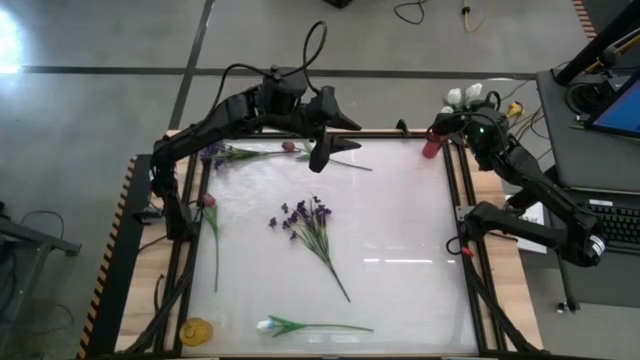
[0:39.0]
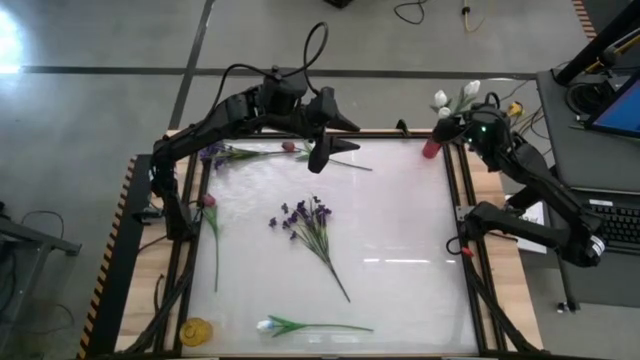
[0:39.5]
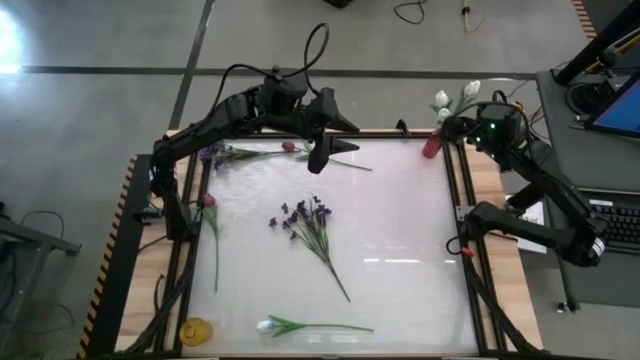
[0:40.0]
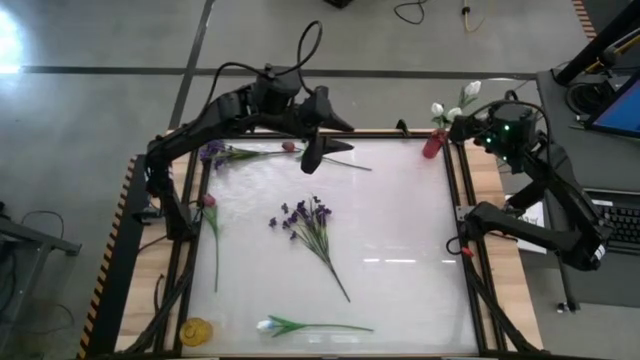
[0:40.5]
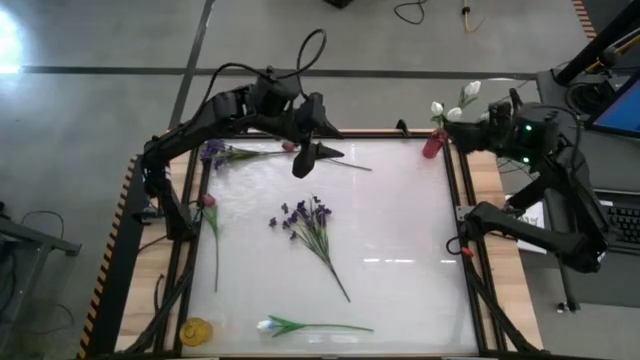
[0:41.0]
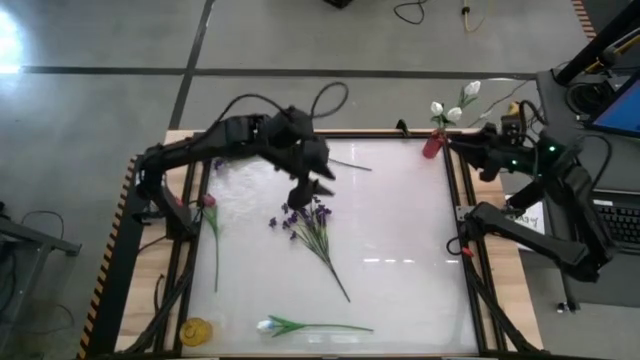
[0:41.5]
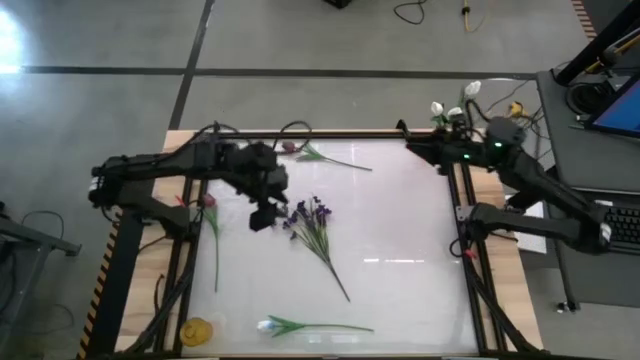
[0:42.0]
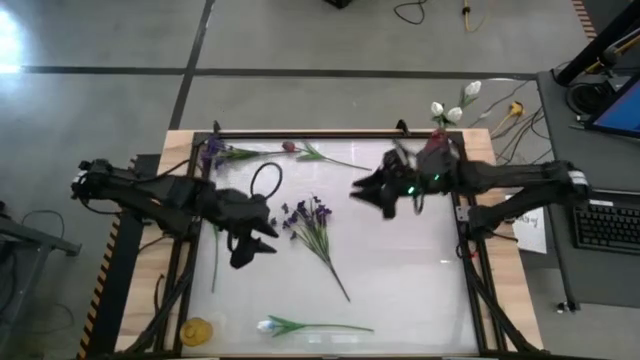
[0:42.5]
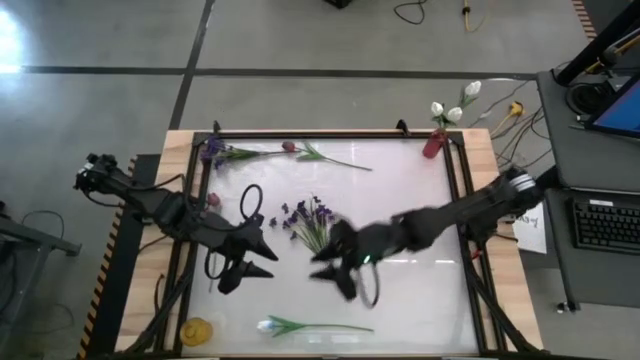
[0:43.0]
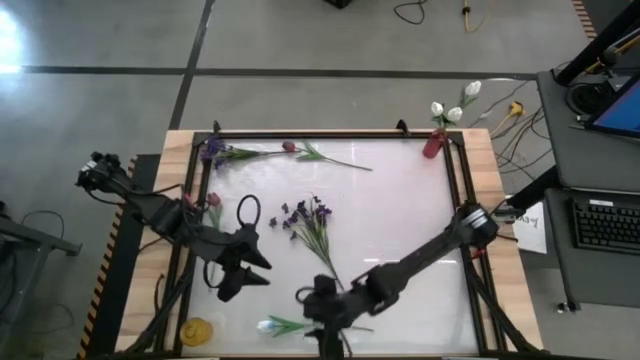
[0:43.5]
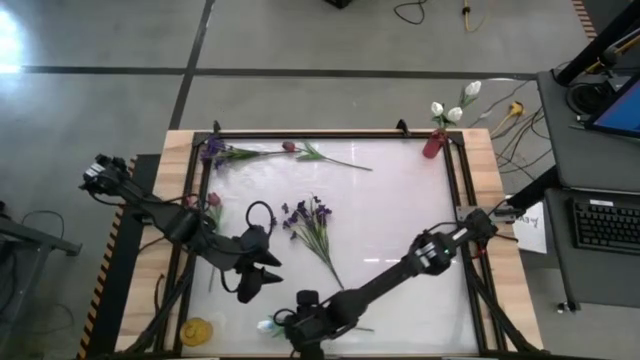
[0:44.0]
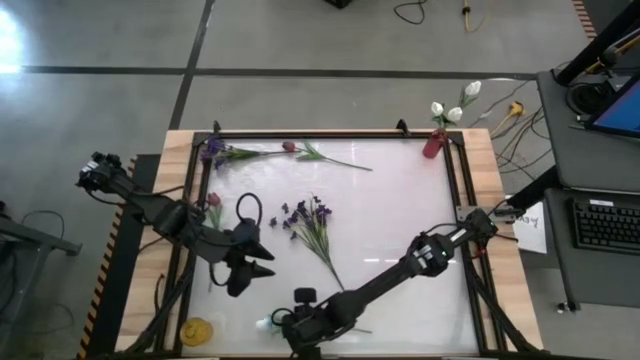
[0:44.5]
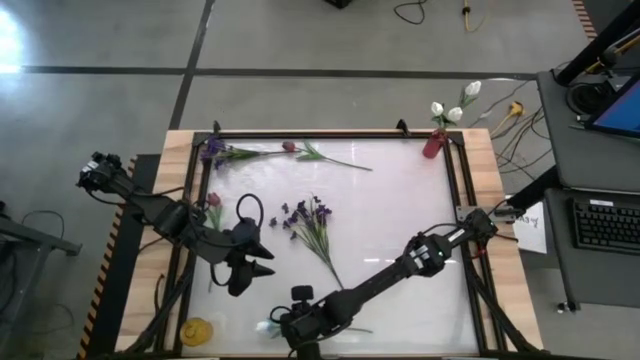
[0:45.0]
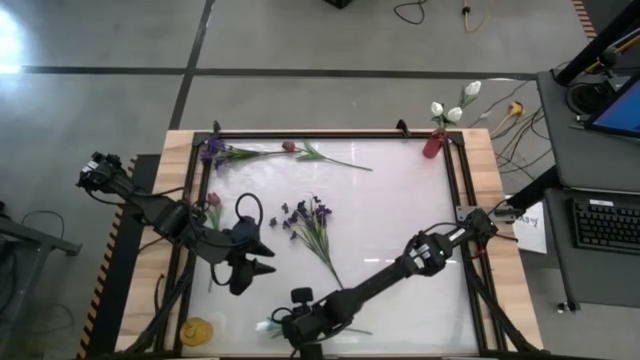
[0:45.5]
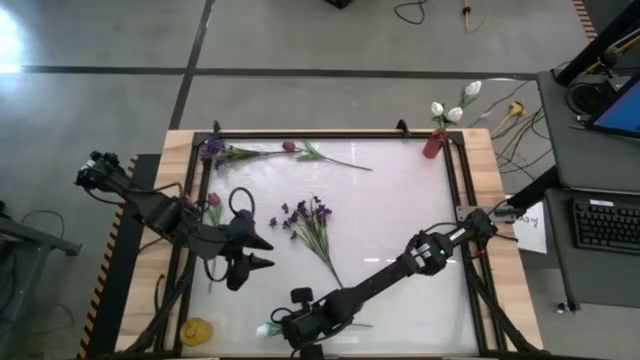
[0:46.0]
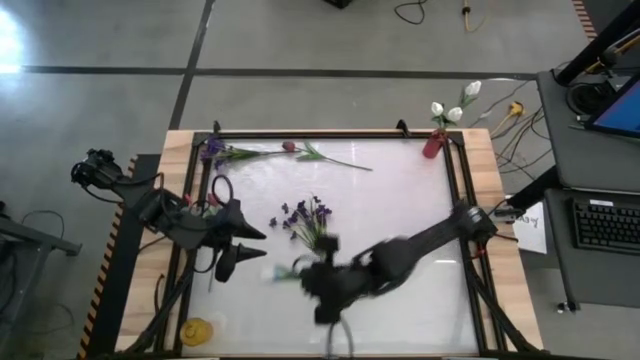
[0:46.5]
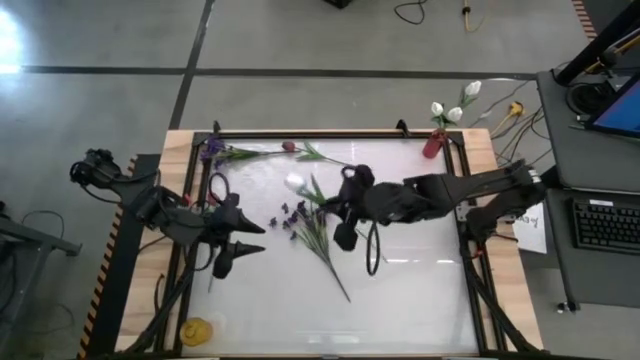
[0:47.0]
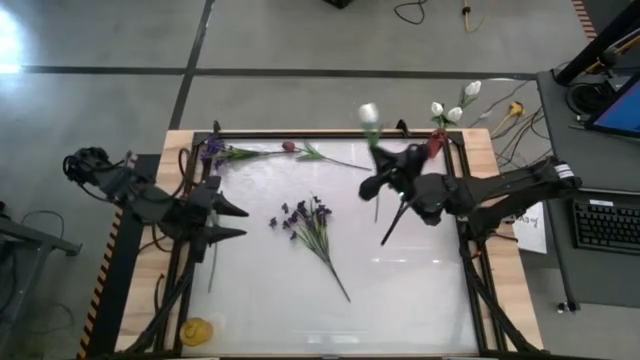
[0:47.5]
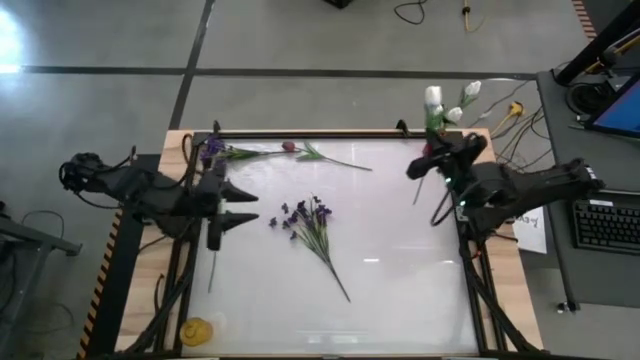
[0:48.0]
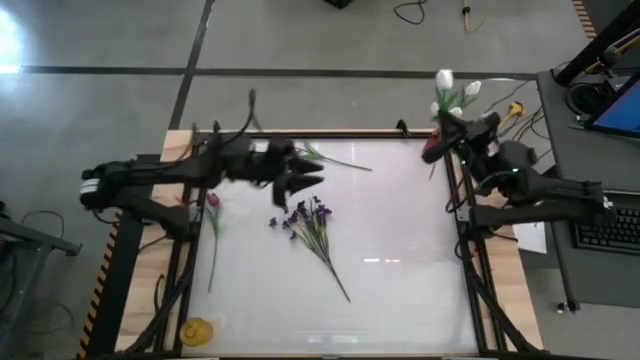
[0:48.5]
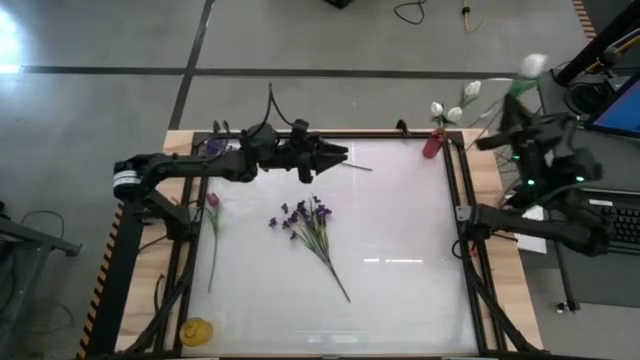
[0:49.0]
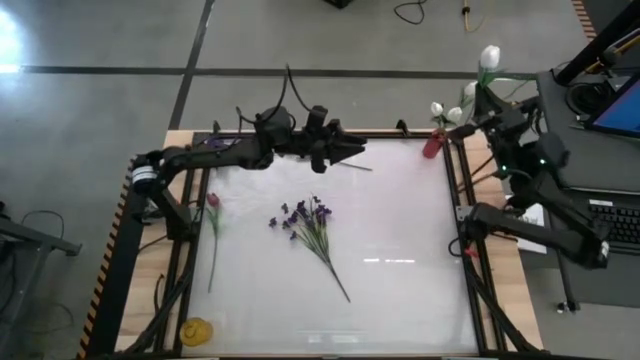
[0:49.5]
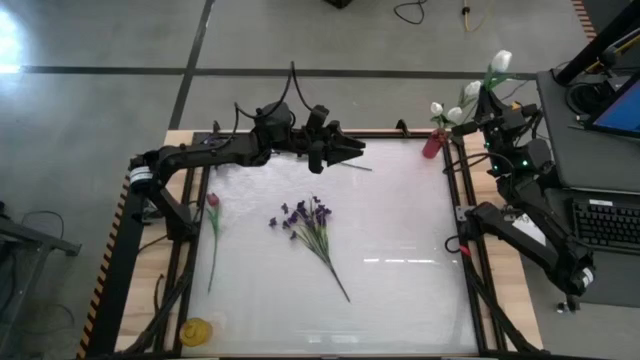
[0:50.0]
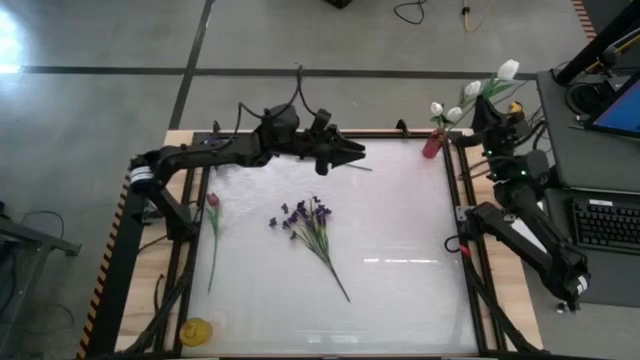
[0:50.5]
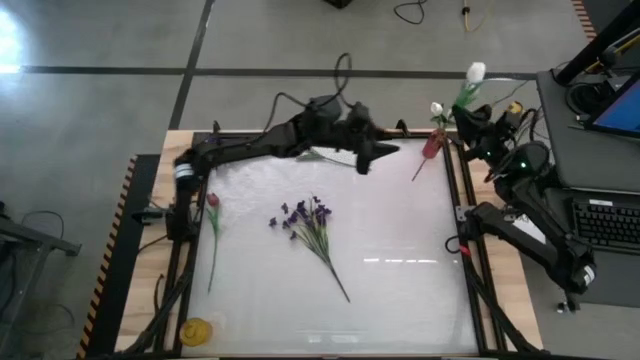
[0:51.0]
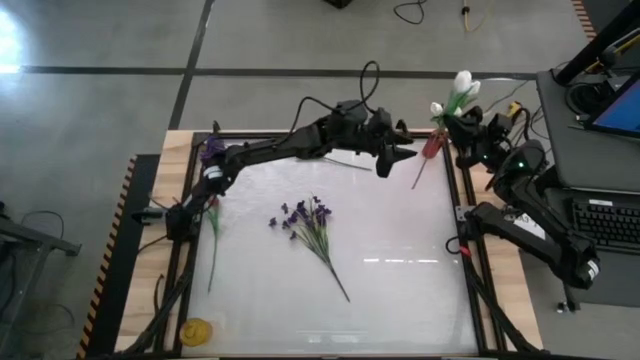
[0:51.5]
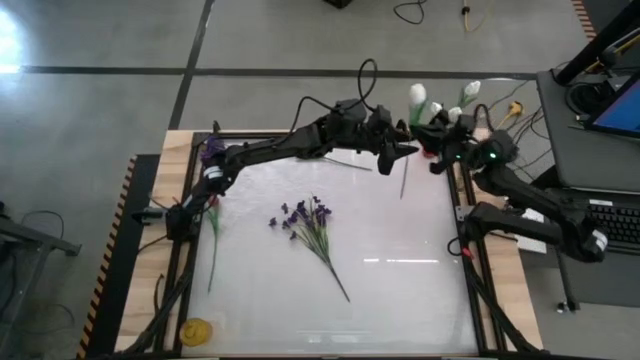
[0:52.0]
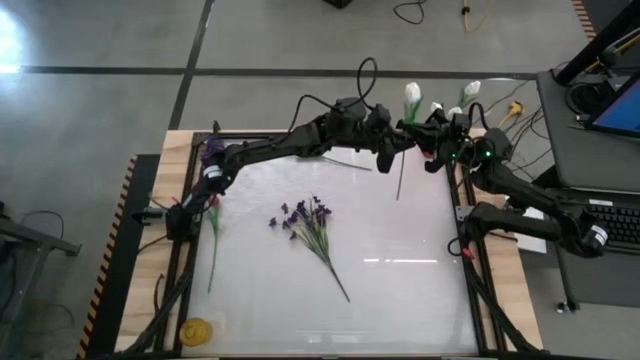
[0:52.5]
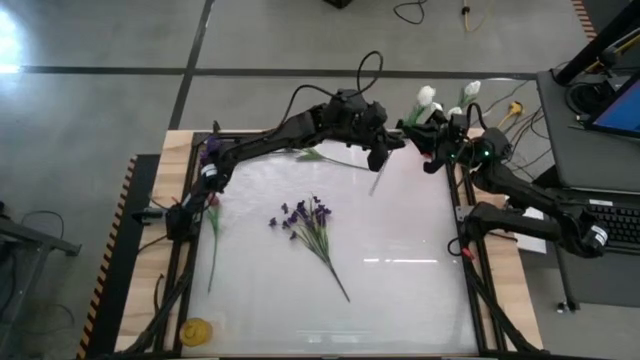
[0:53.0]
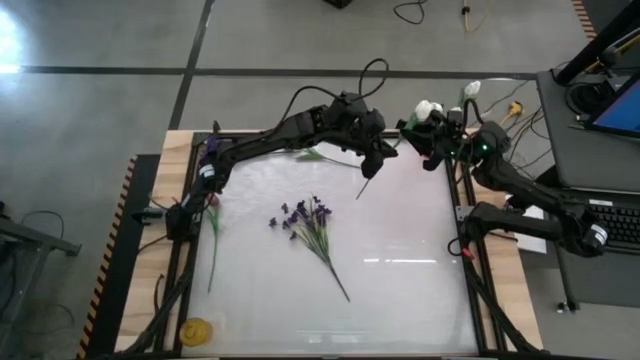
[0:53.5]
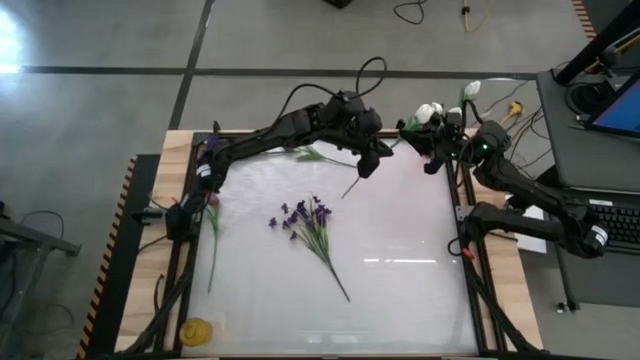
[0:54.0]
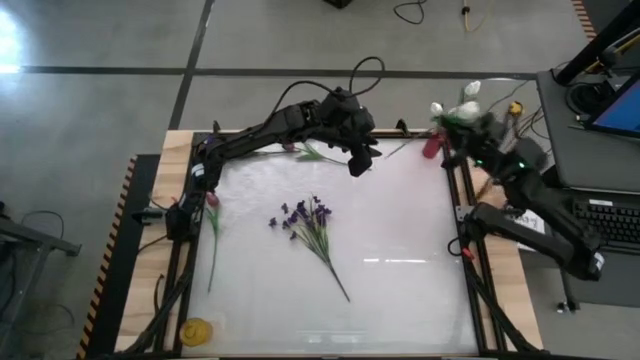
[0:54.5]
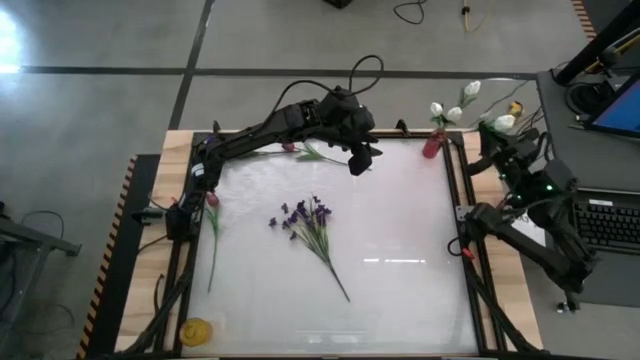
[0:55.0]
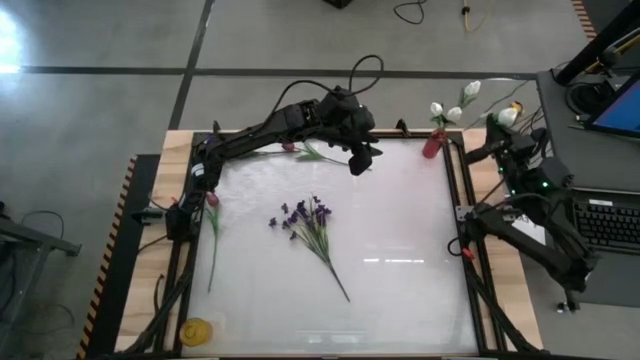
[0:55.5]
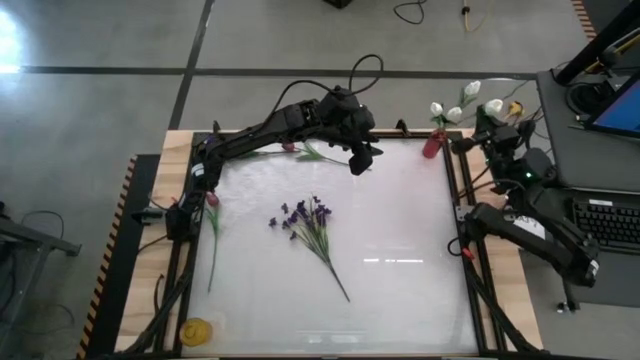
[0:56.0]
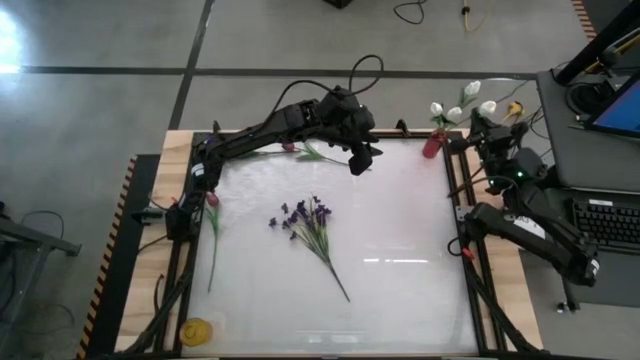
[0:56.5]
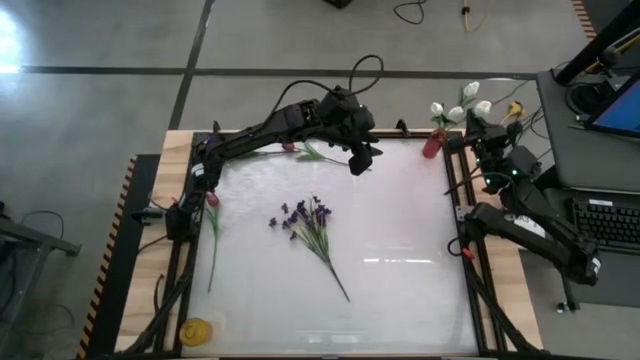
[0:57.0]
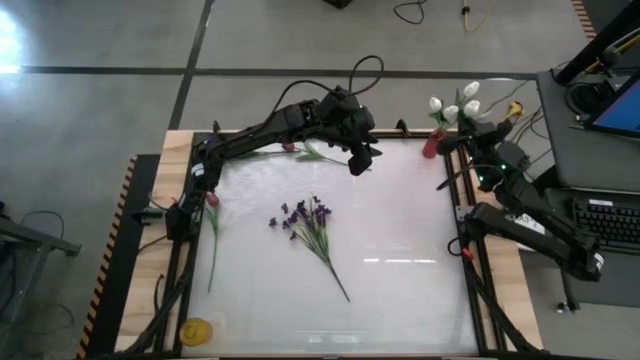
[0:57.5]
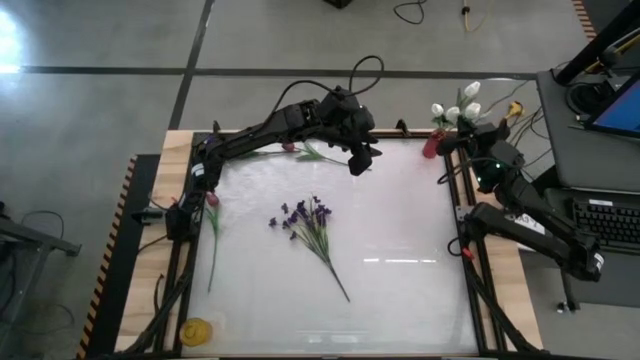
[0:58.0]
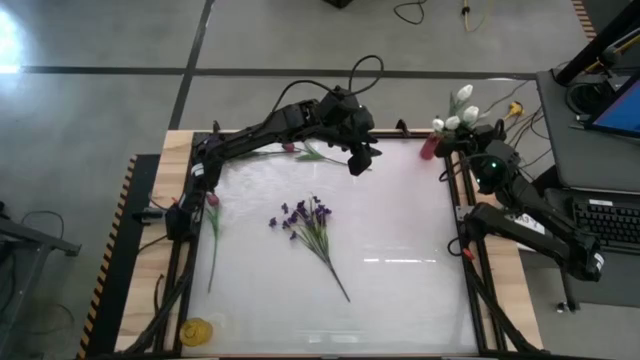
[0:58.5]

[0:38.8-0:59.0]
Task: Sort flowers into vase by color
Put the white tulip into the red flower vase
